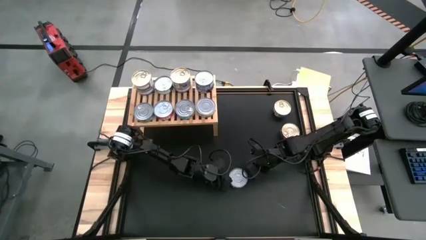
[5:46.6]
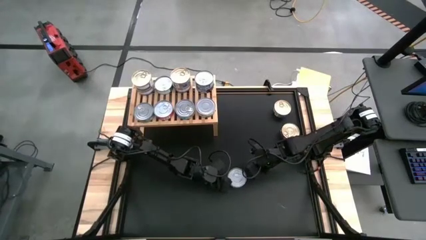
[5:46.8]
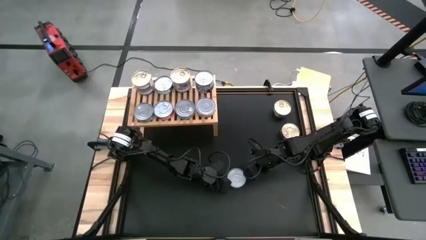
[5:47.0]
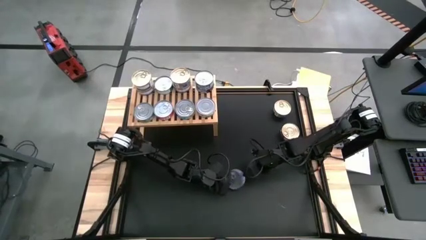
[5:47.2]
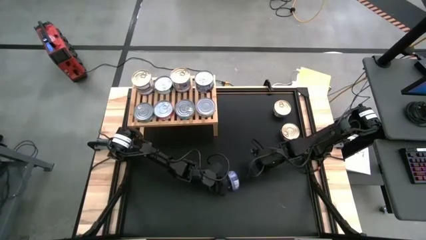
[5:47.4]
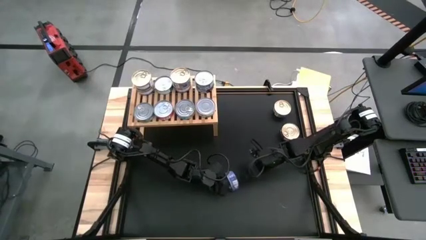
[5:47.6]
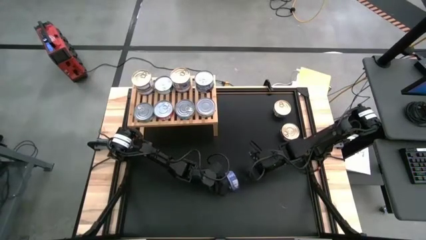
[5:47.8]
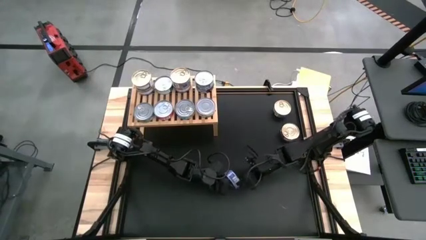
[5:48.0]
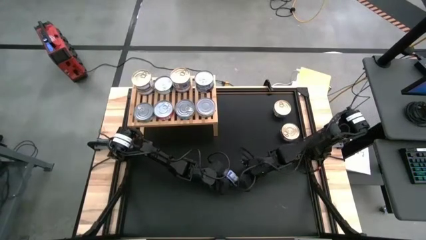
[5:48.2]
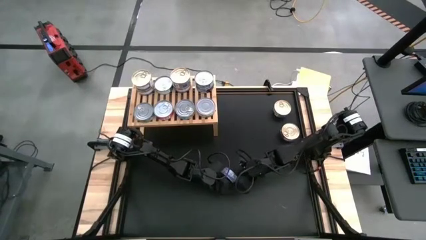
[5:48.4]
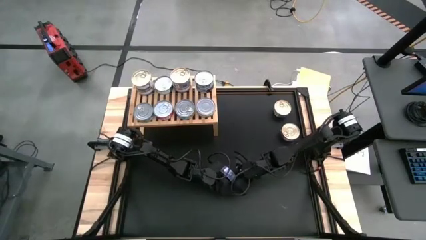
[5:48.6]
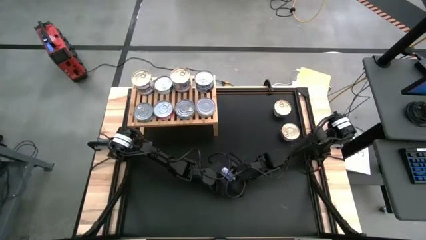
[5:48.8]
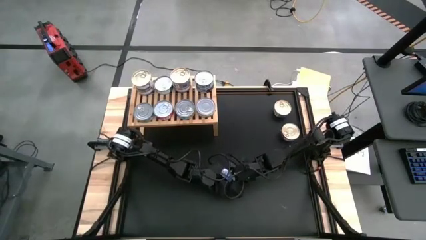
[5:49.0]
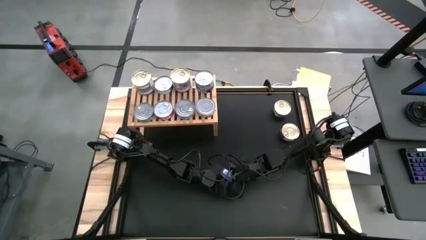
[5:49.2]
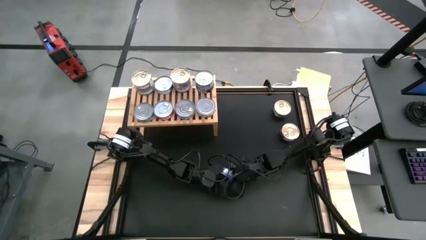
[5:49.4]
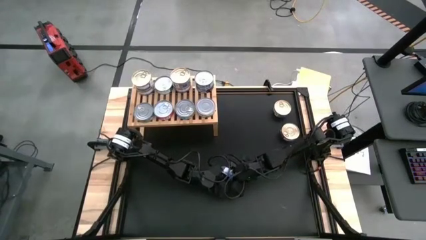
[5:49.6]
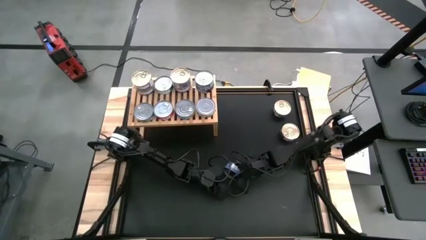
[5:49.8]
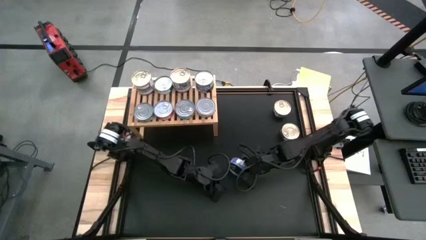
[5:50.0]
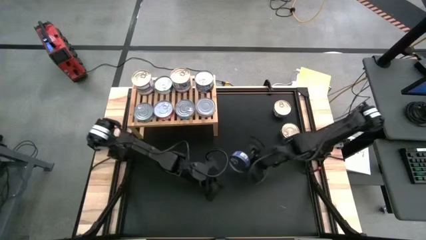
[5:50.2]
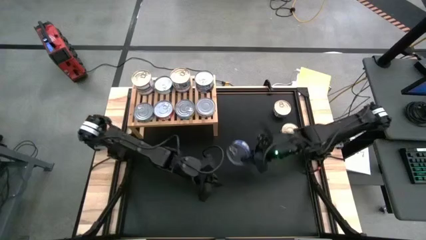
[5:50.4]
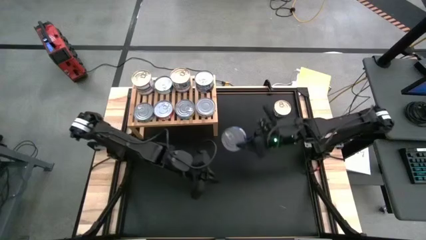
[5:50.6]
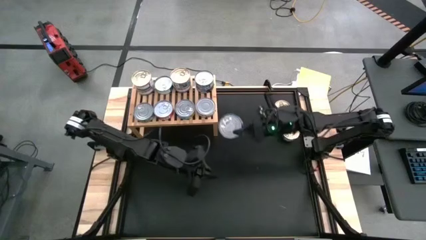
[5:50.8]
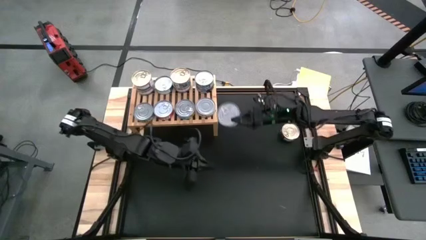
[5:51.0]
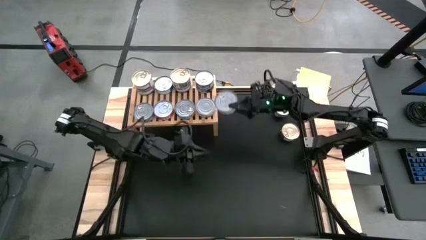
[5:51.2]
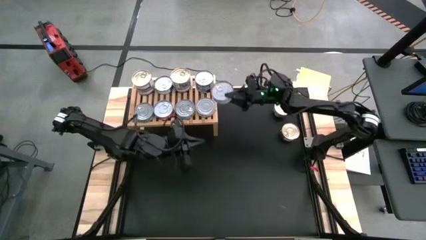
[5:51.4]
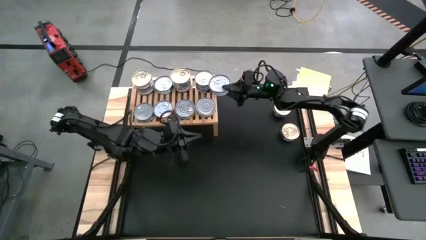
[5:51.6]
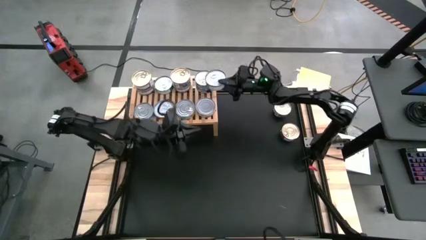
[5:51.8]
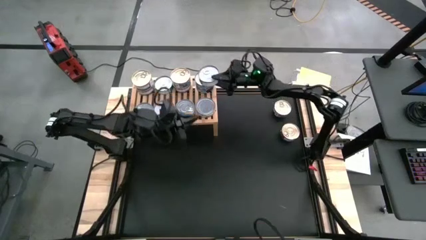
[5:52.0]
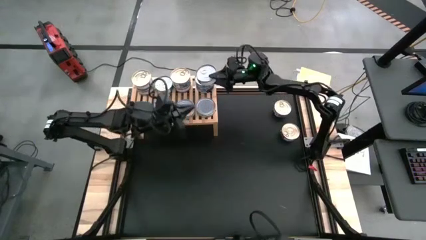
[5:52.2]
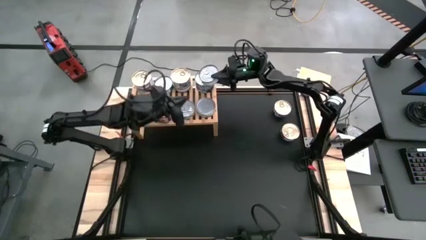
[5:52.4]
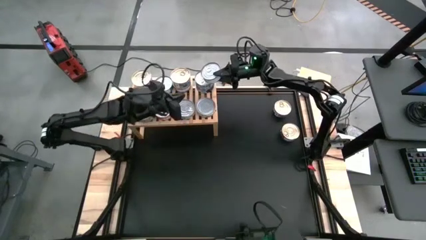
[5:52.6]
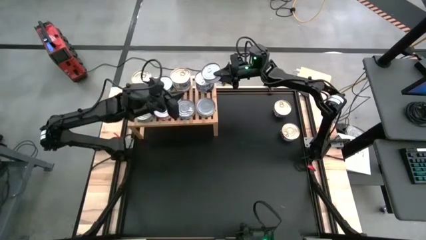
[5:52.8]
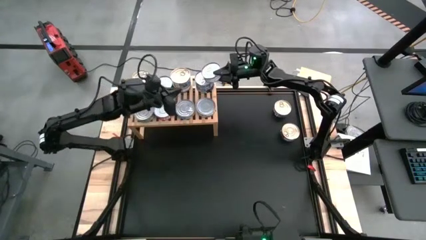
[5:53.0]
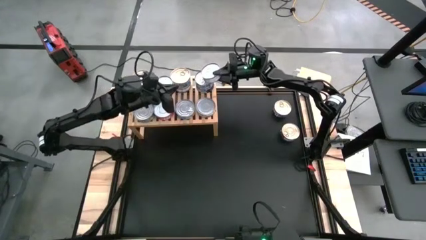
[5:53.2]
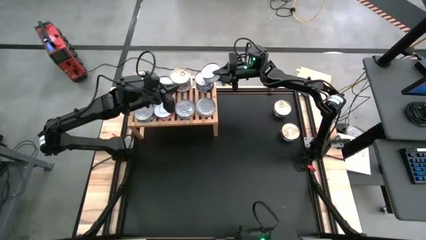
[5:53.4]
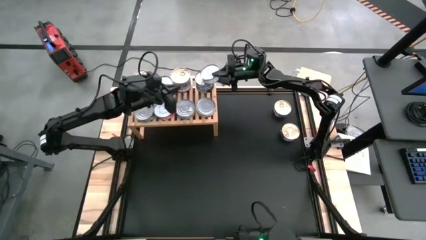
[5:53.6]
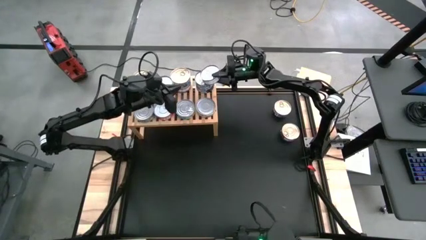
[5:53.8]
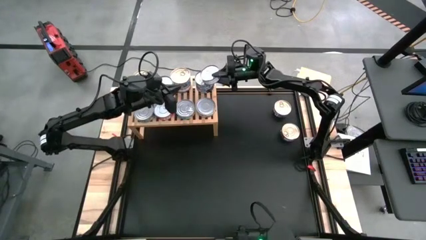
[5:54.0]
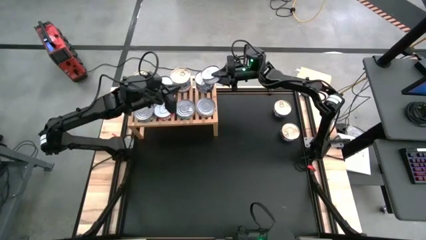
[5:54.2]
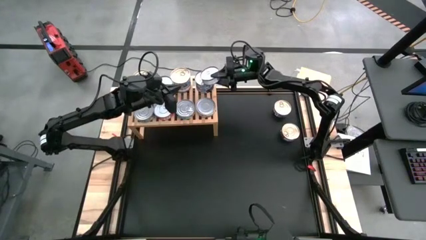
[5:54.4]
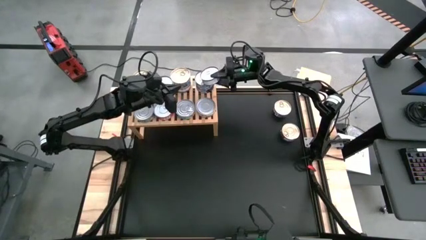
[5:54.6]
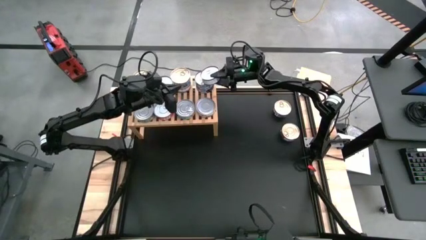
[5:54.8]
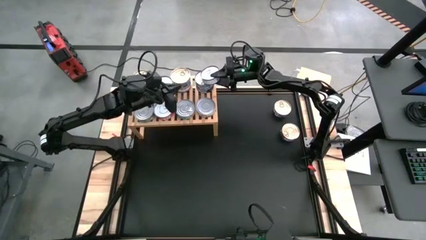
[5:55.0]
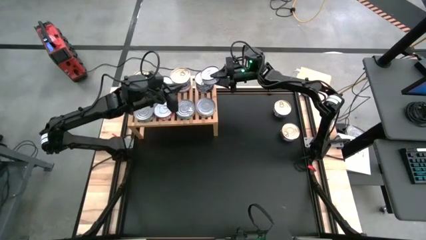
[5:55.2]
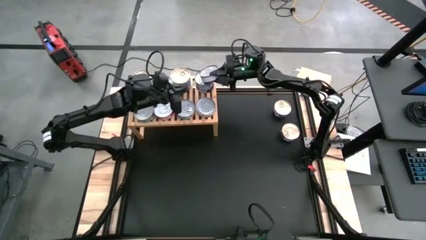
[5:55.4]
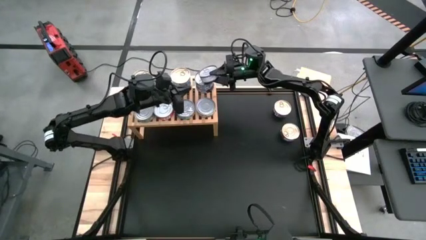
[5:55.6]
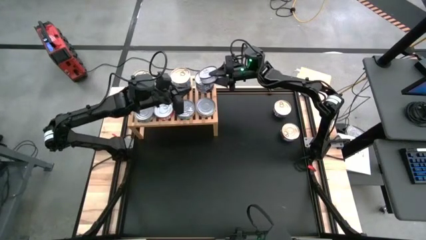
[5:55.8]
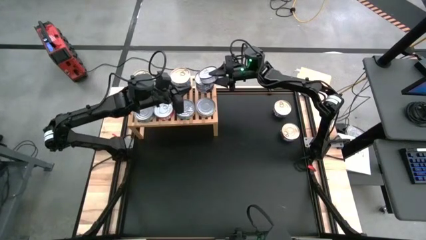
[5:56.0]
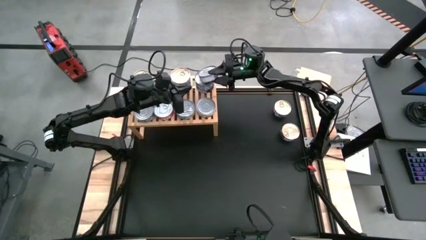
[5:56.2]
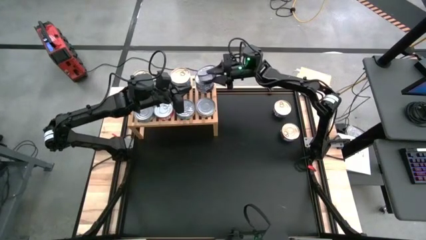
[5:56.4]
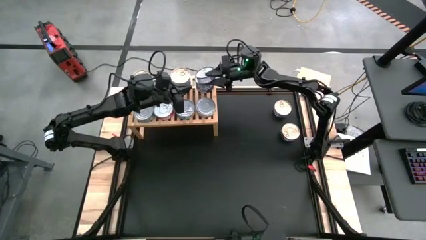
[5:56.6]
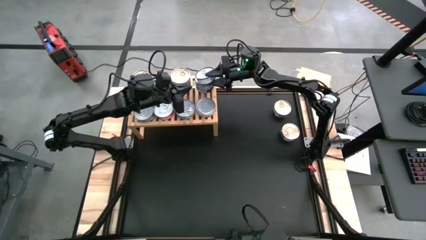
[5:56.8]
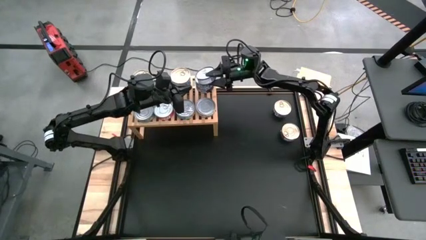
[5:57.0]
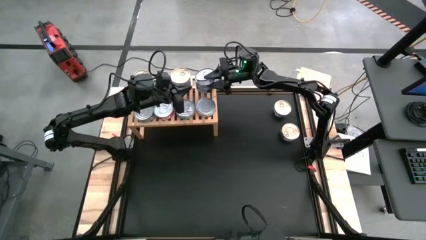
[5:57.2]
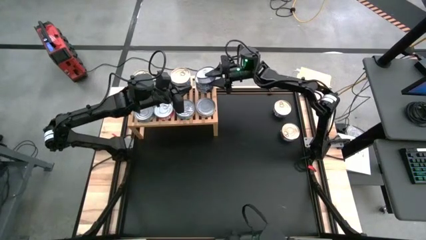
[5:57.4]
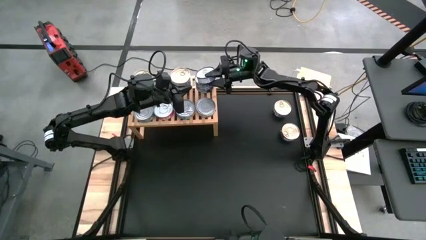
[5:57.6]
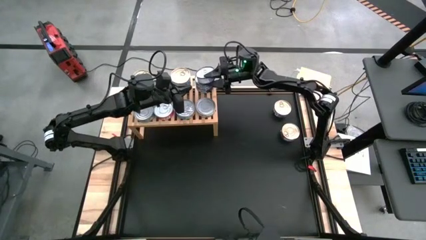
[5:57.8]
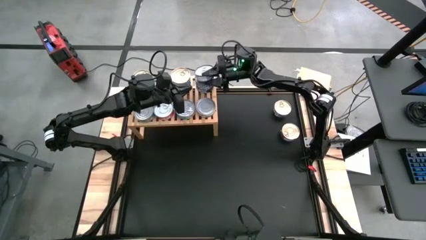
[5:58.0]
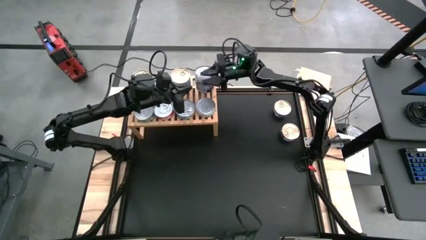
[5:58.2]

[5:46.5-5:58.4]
Task: Stack canned seafood by type on shelf
Stack the blue tuna can on top of the other blue tuna cans on the shelf
